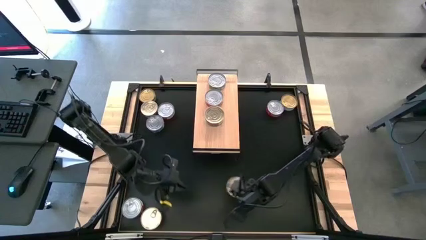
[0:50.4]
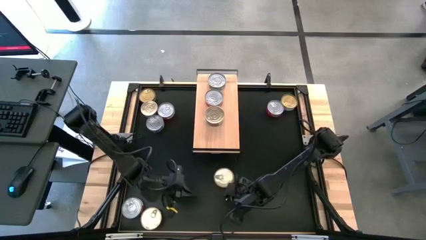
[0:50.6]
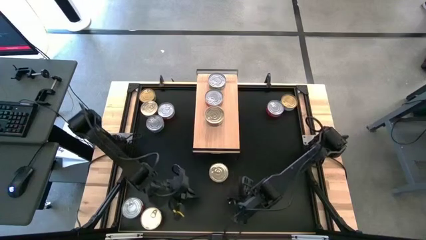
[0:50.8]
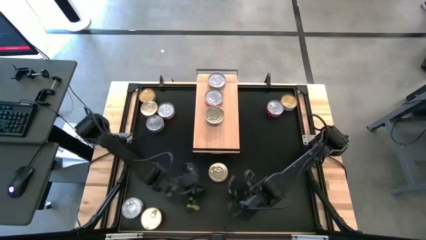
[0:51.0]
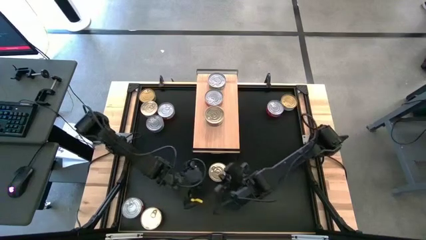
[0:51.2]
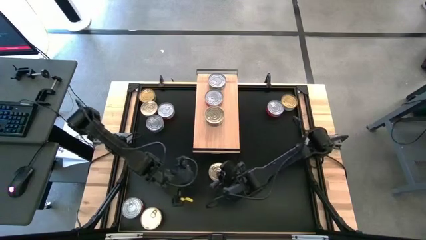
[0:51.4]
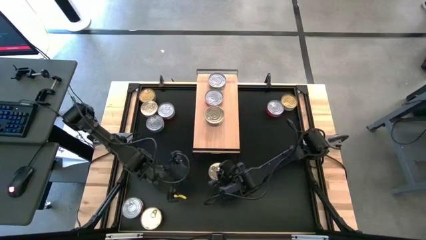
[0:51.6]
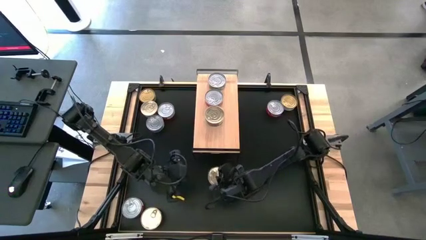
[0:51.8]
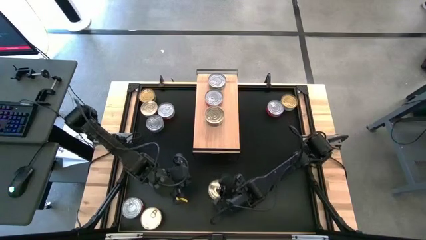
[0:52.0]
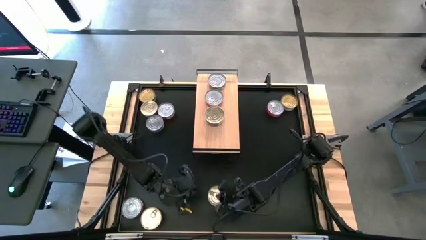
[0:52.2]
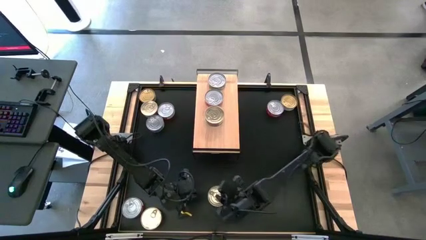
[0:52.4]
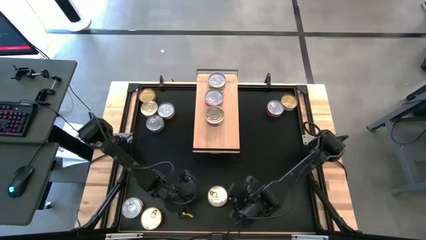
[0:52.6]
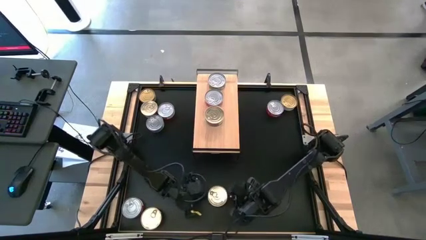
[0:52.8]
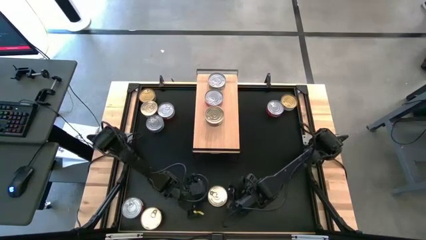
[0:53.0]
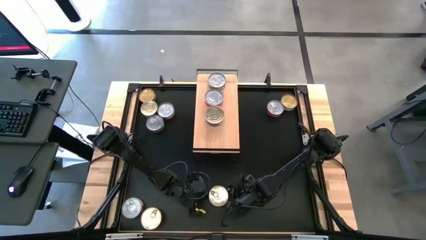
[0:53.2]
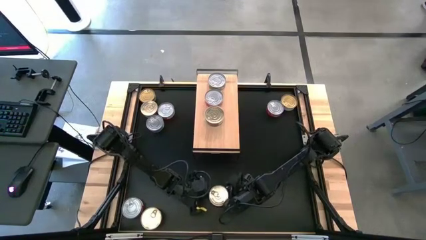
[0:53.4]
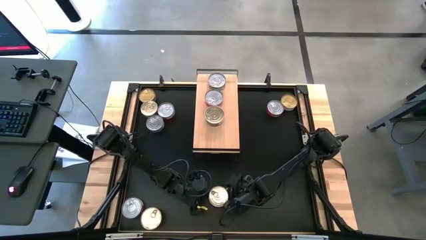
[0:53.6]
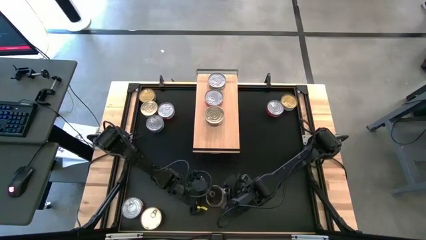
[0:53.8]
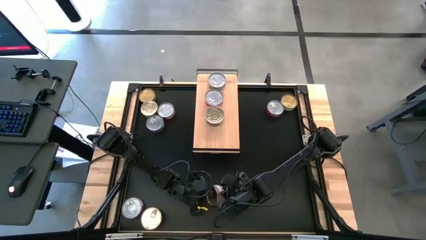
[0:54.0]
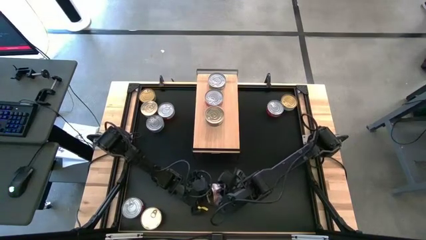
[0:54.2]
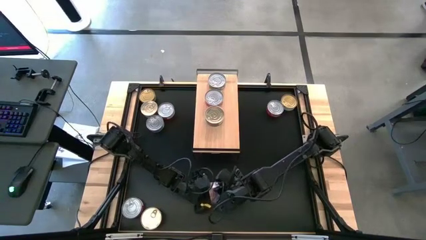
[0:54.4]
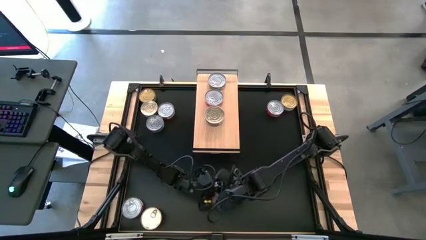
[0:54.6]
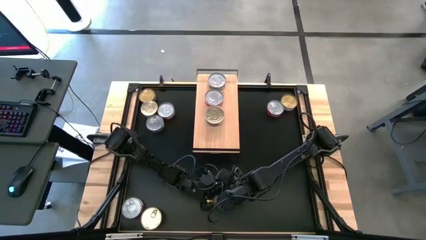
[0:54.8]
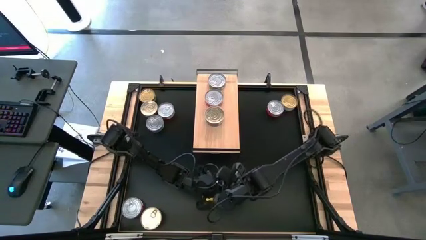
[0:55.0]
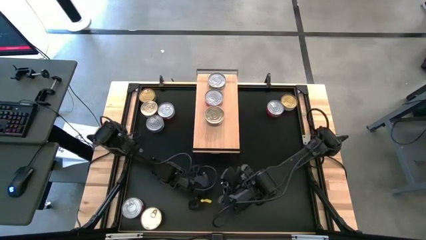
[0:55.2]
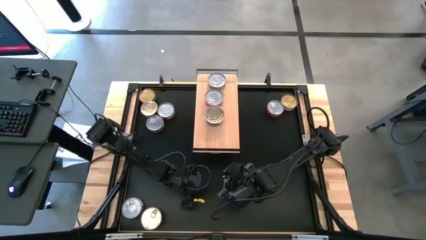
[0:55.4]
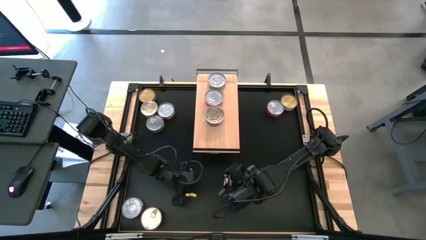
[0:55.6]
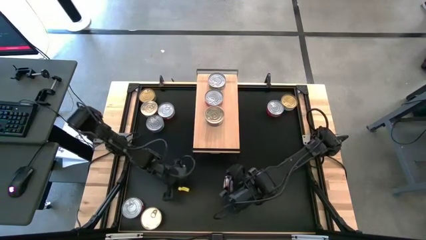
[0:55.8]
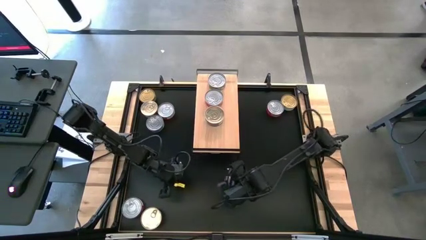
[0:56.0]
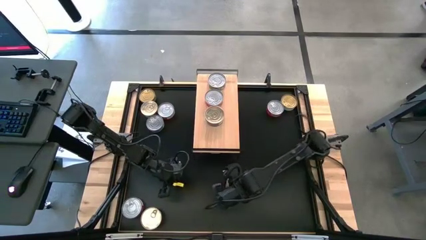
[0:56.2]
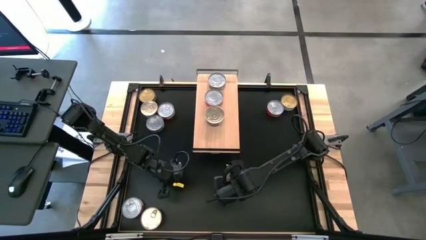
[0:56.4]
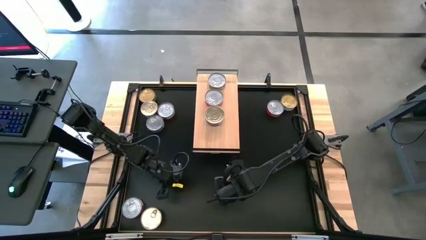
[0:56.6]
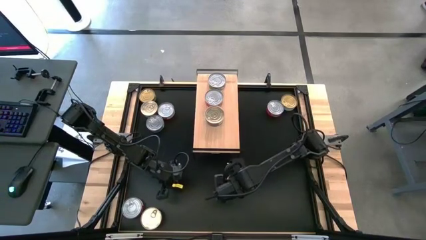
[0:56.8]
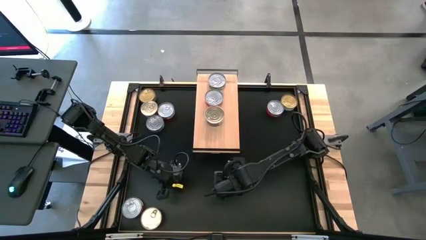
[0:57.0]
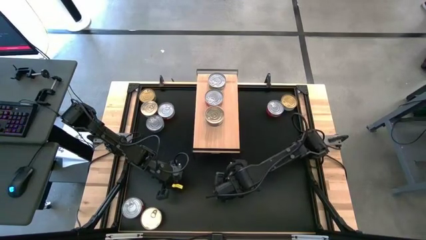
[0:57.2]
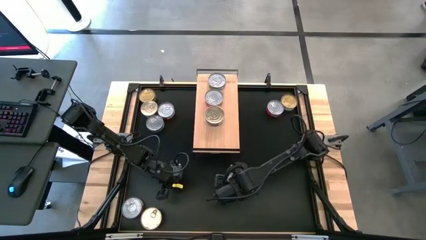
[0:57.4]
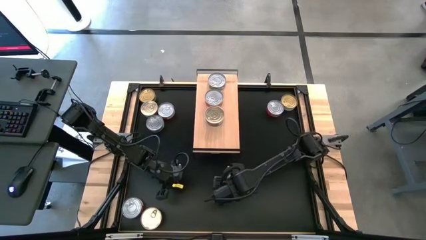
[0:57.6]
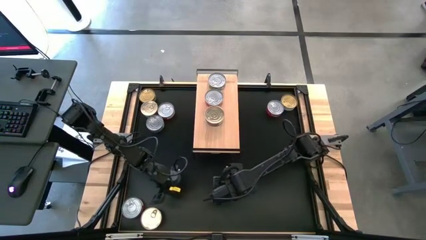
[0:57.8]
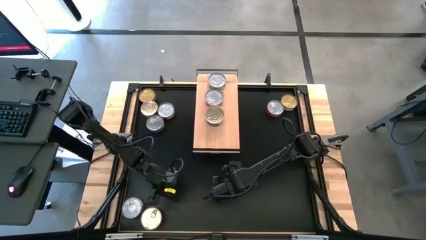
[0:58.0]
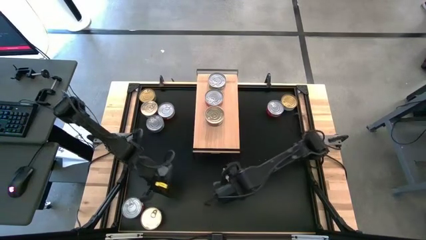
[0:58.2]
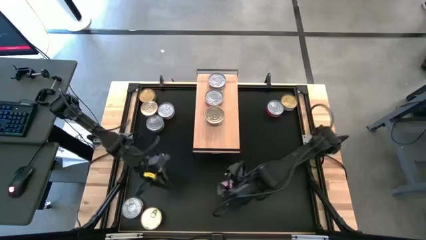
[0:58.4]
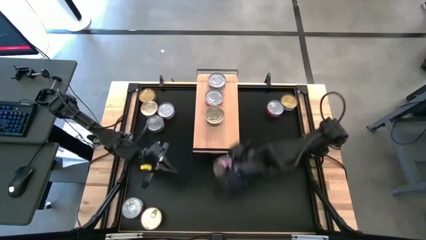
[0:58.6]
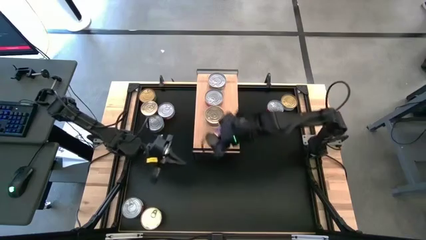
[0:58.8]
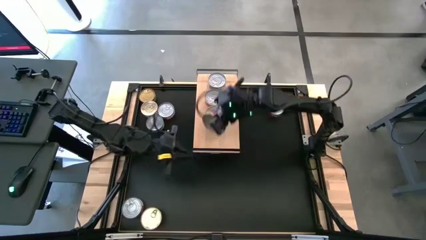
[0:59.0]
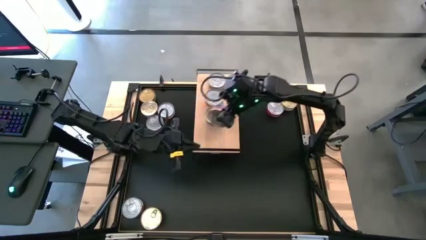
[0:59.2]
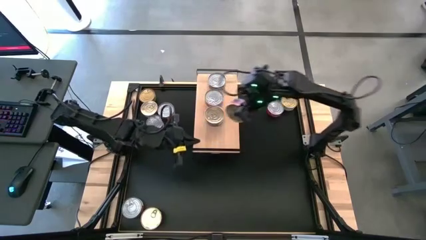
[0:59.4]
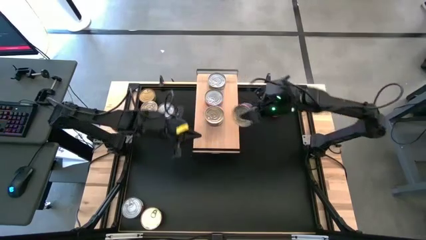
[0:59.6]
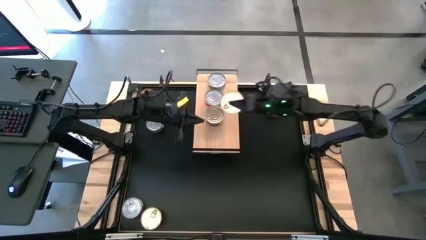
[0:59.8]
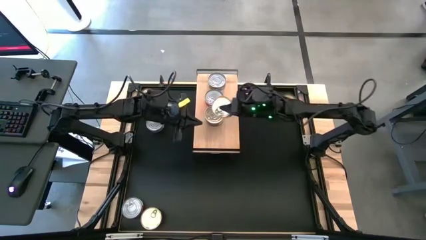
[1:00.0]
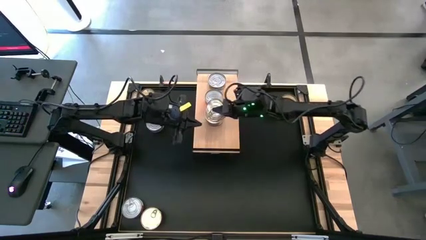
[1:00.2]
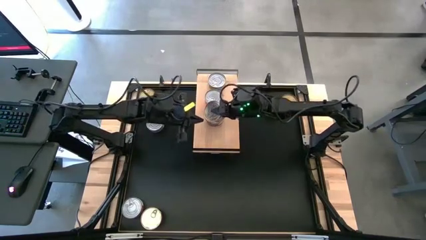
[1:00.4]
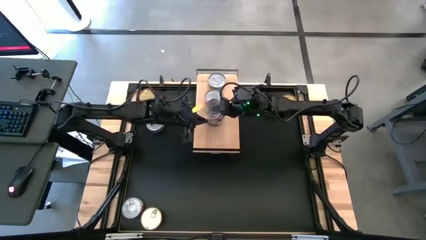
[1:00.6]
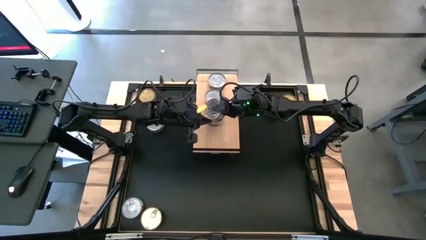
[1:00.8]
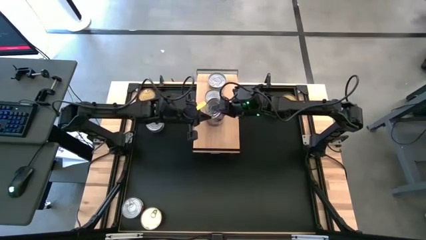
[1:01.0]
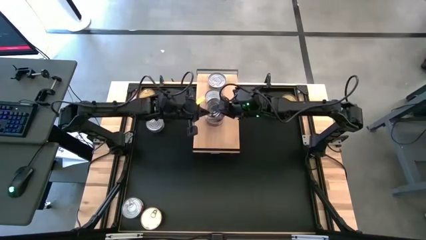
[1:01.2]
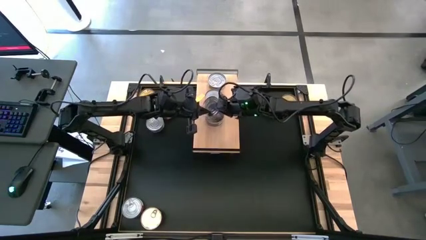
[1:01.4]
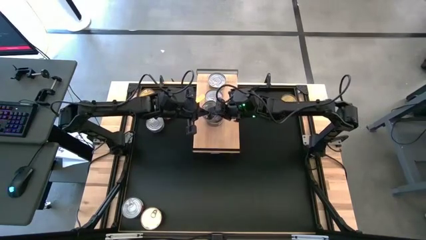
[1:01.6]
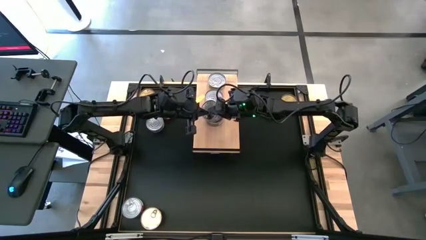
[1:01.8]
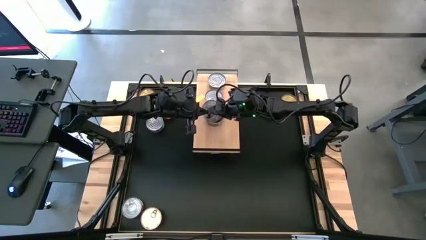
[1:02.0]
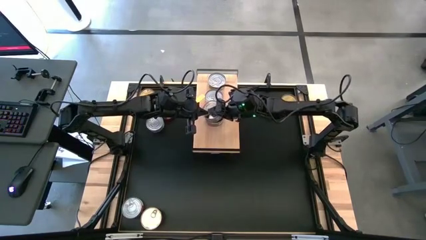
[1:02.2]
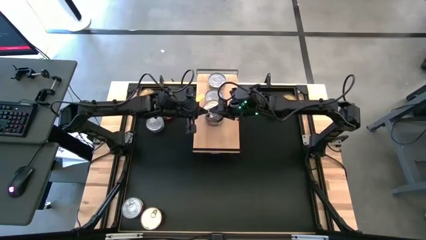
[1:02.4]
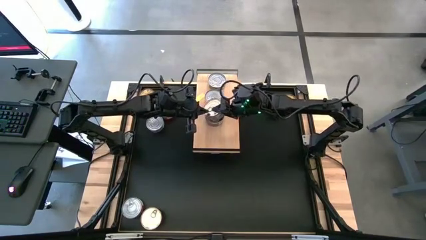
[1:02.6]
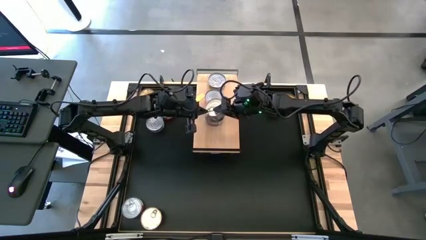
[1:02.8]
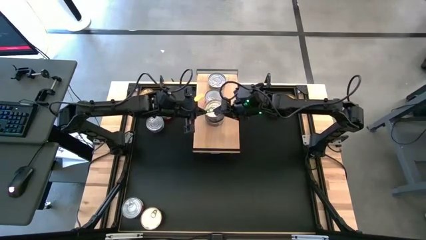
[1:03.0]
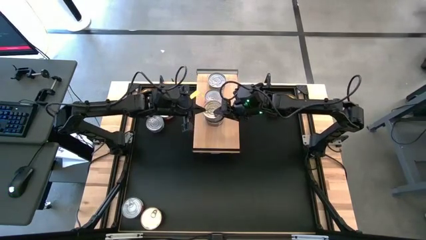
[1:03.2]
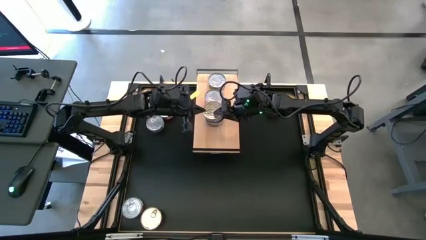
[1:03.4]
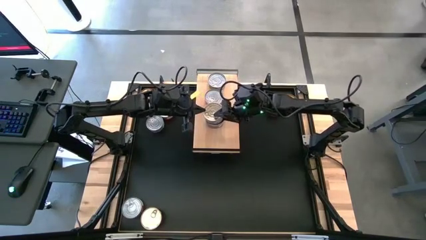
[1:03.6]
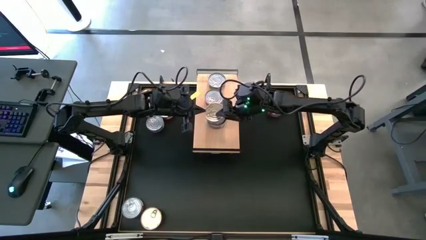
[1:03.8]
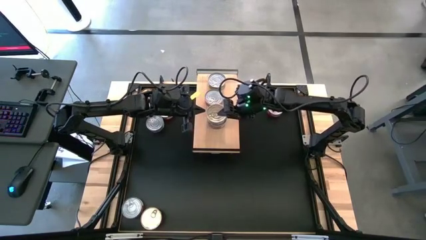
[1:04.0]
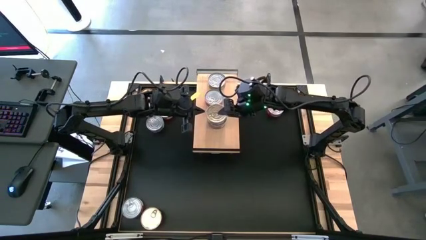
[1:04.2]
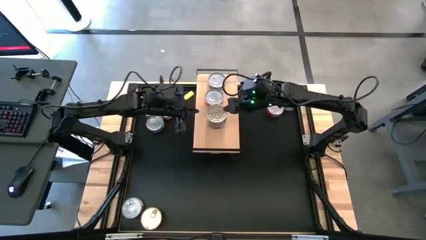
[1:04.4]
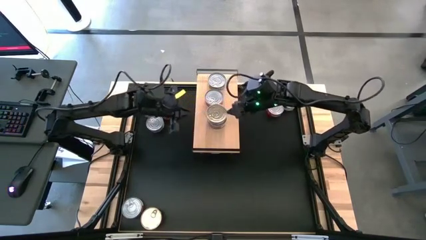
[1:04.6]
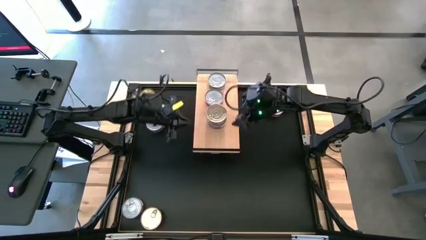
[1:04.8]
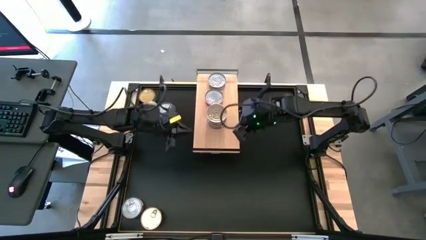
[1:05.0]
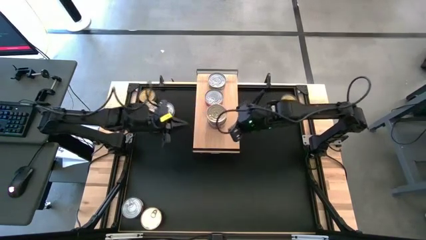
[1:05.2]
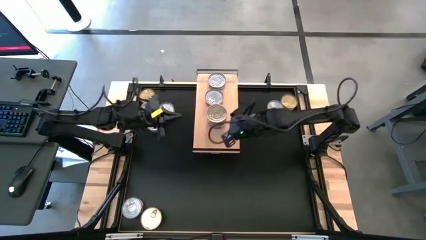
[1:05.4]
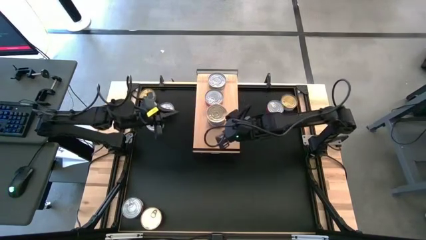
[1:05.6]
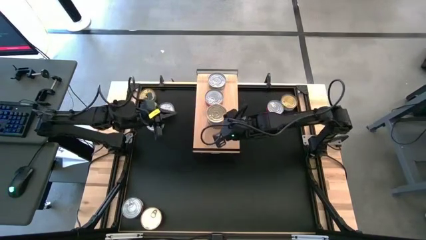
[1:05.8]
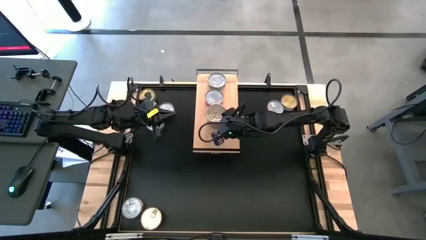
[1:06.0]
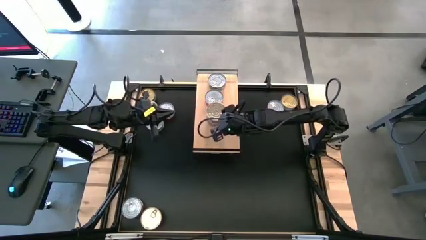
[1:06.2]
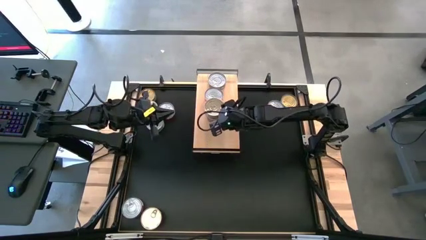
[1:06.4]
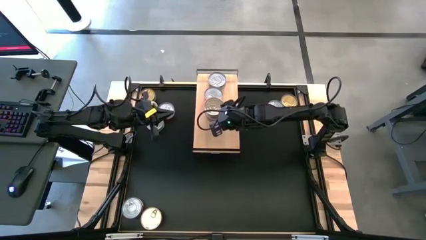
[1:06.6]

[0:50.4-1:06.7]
Task: Stack canned seafood by type on shelf
Stack the blue pink tuna can on top of the blue pink tuna can on the shelf
